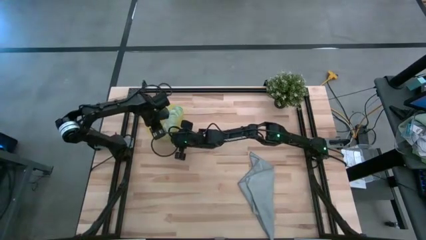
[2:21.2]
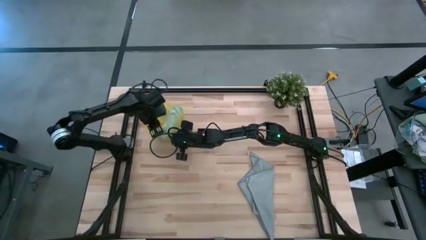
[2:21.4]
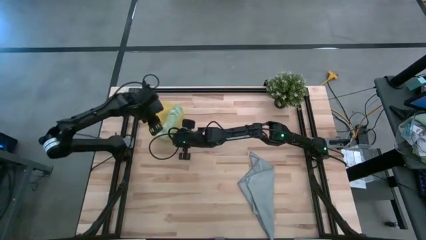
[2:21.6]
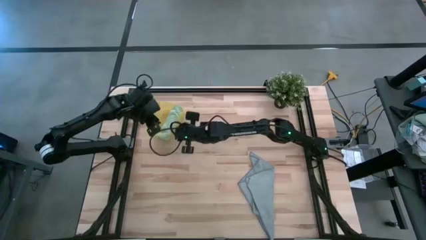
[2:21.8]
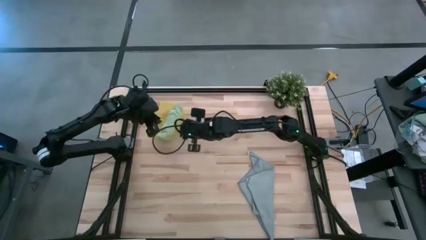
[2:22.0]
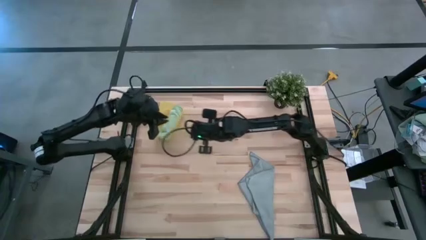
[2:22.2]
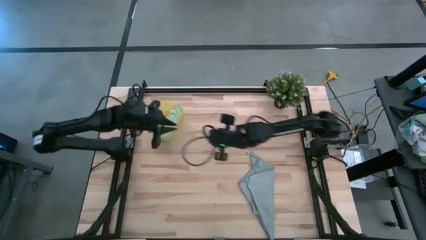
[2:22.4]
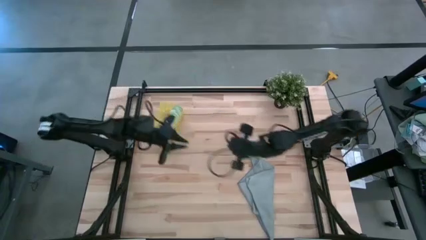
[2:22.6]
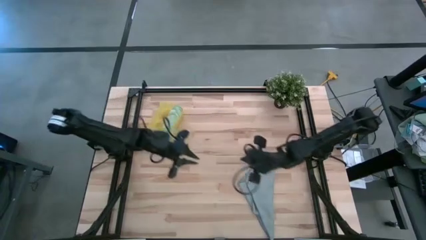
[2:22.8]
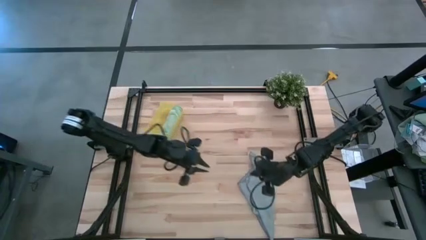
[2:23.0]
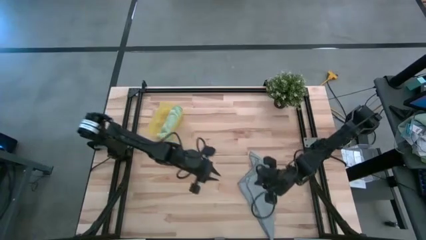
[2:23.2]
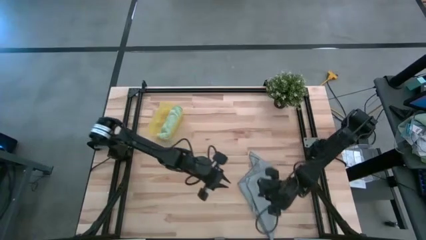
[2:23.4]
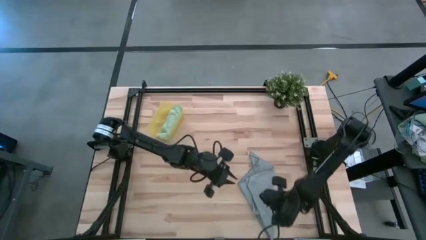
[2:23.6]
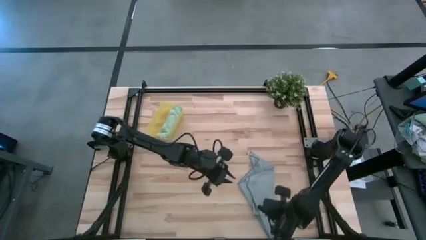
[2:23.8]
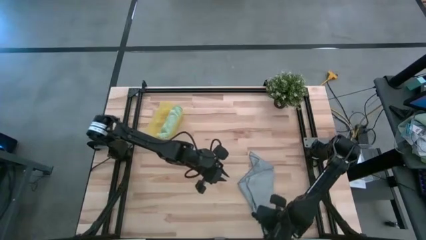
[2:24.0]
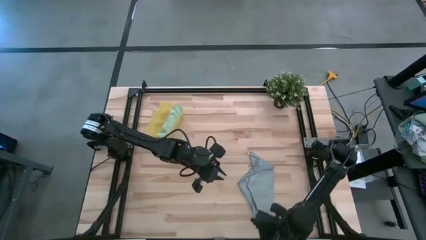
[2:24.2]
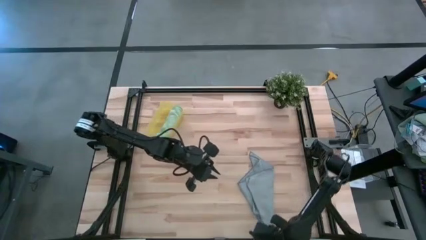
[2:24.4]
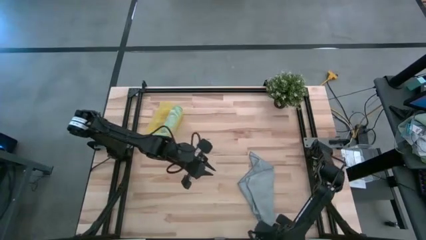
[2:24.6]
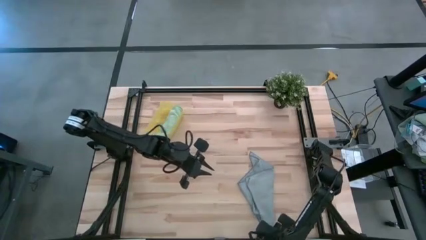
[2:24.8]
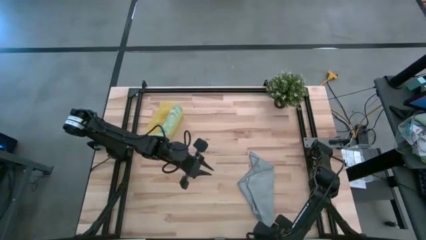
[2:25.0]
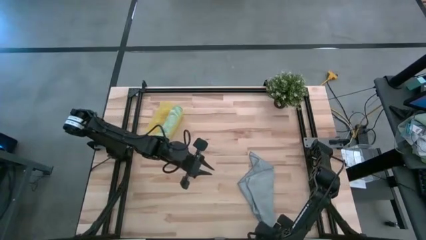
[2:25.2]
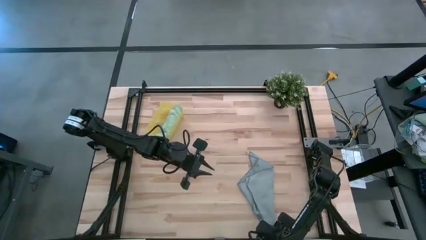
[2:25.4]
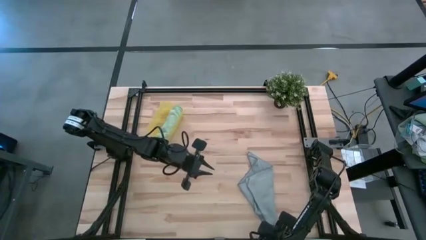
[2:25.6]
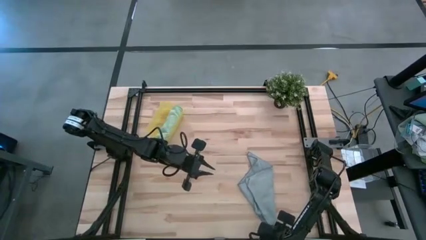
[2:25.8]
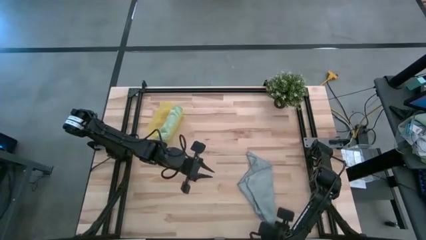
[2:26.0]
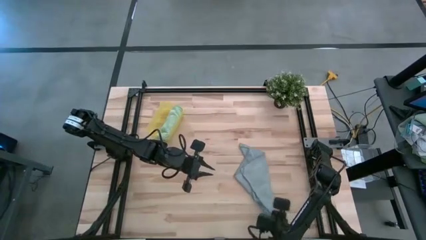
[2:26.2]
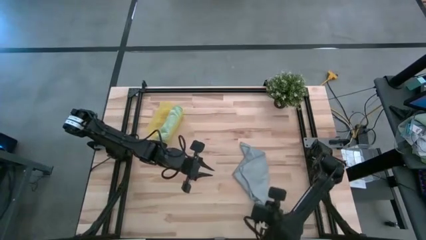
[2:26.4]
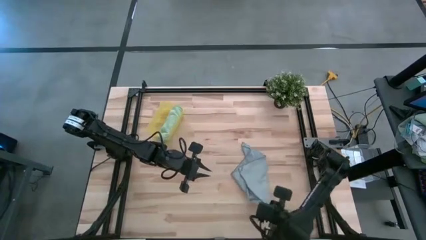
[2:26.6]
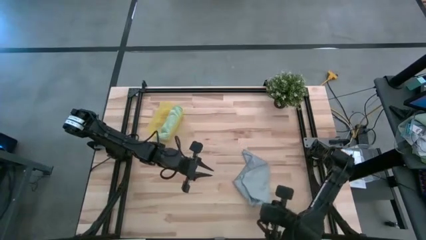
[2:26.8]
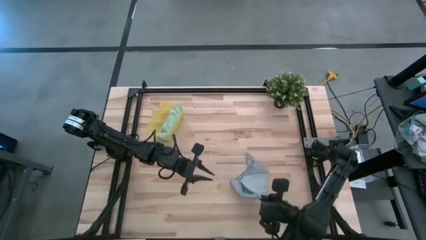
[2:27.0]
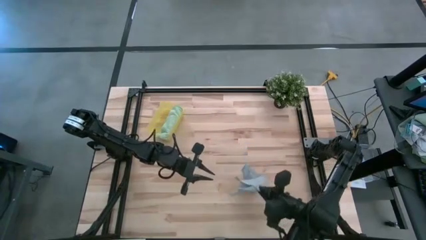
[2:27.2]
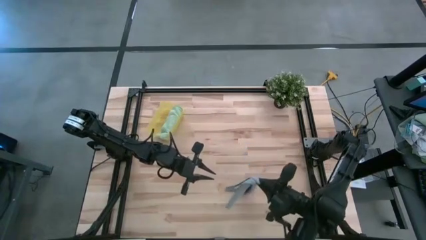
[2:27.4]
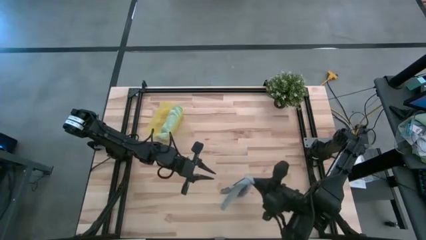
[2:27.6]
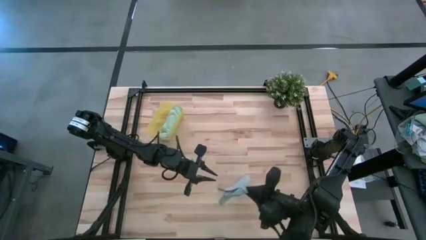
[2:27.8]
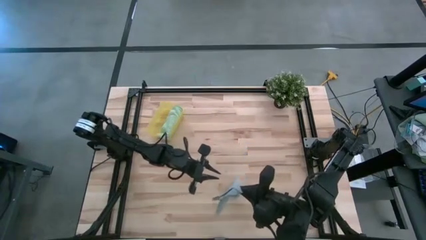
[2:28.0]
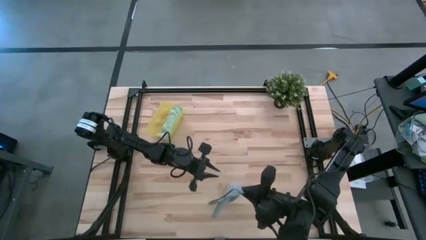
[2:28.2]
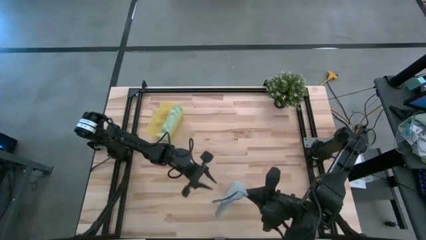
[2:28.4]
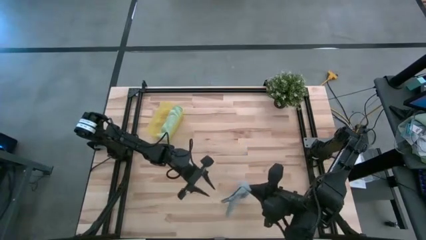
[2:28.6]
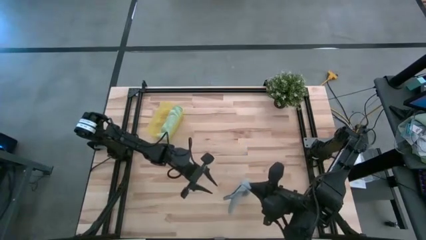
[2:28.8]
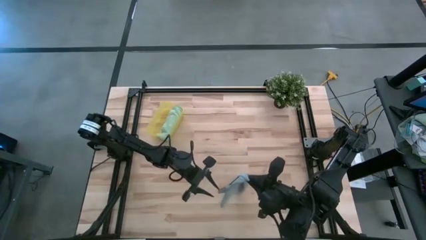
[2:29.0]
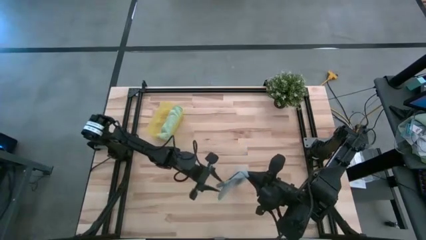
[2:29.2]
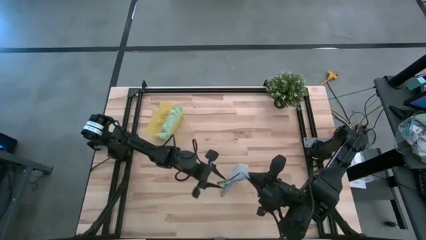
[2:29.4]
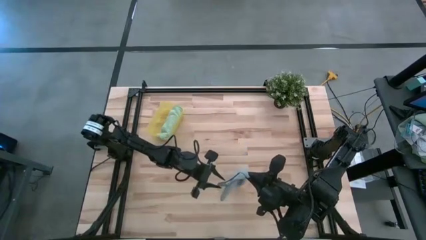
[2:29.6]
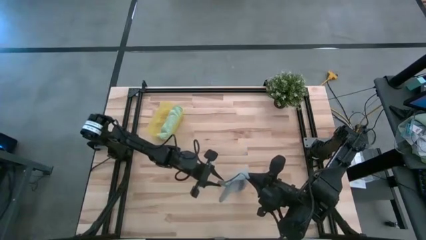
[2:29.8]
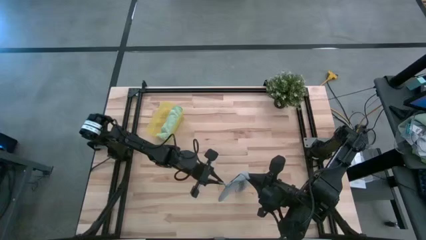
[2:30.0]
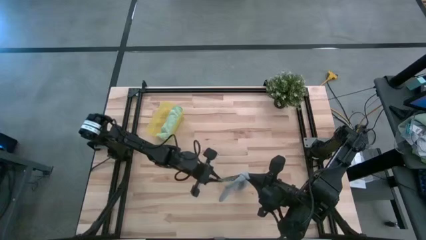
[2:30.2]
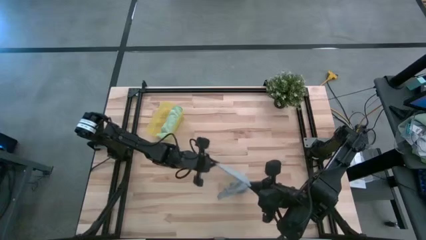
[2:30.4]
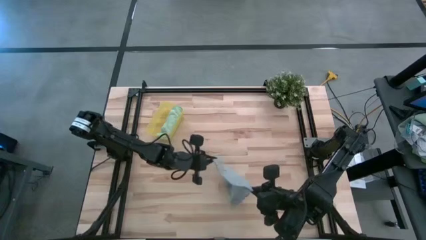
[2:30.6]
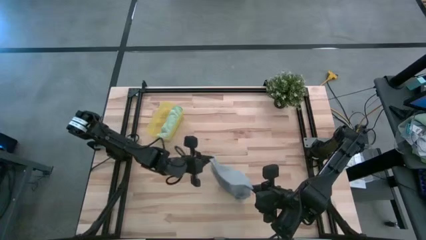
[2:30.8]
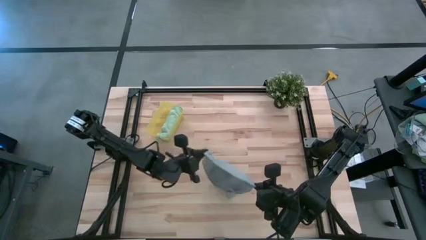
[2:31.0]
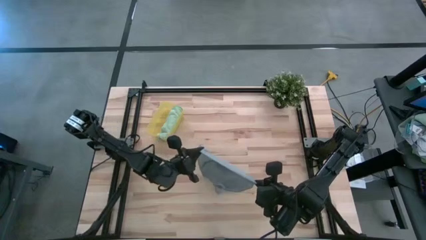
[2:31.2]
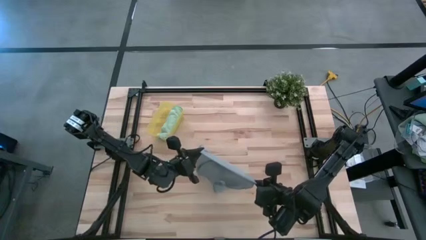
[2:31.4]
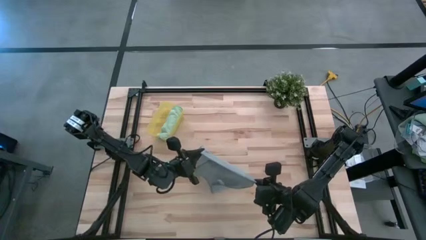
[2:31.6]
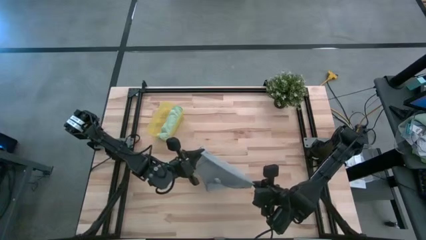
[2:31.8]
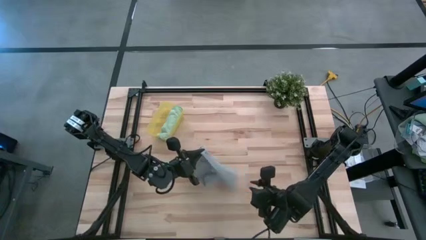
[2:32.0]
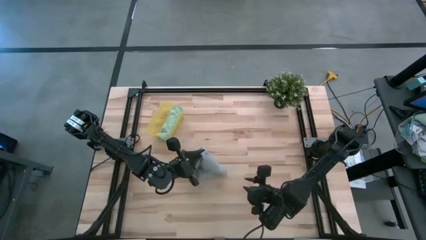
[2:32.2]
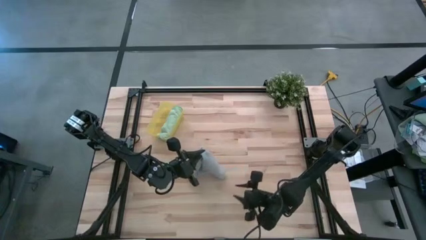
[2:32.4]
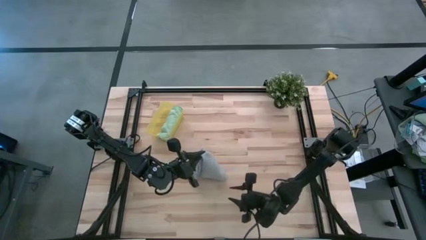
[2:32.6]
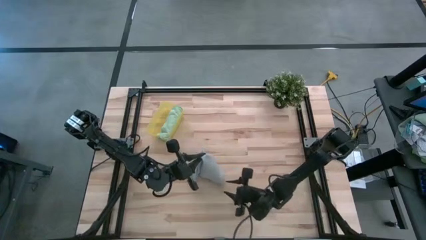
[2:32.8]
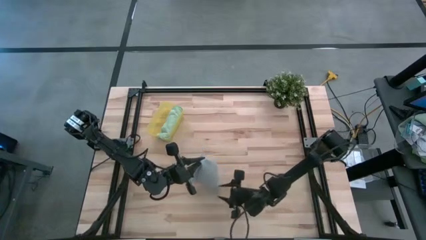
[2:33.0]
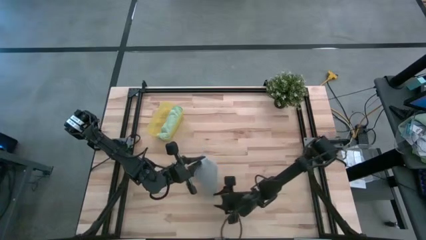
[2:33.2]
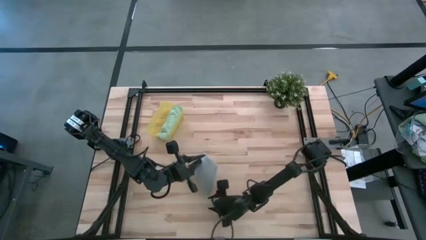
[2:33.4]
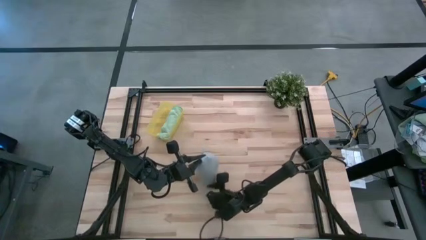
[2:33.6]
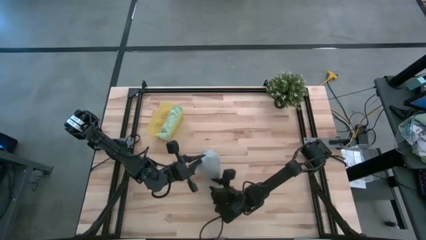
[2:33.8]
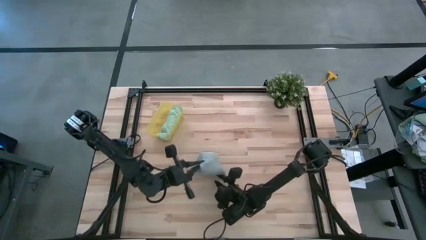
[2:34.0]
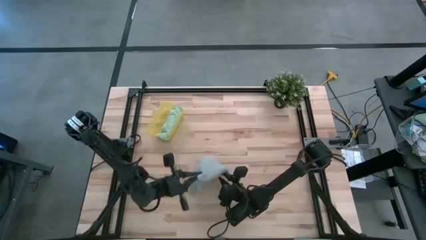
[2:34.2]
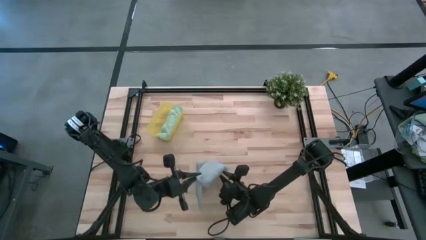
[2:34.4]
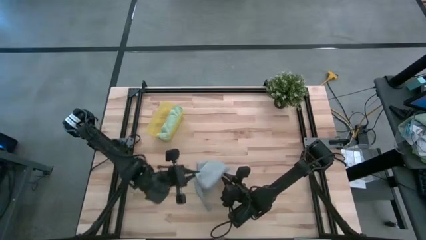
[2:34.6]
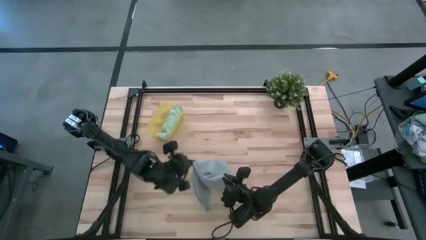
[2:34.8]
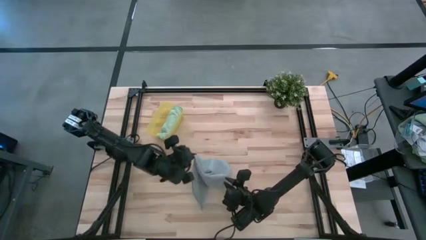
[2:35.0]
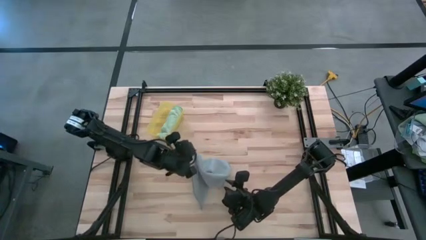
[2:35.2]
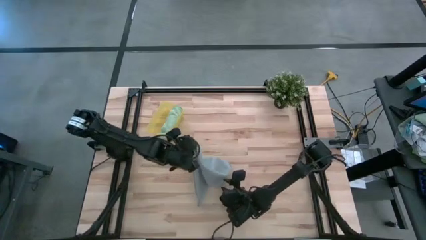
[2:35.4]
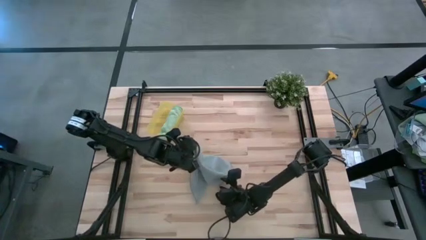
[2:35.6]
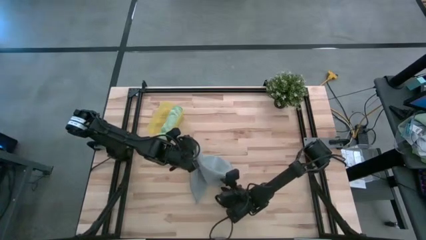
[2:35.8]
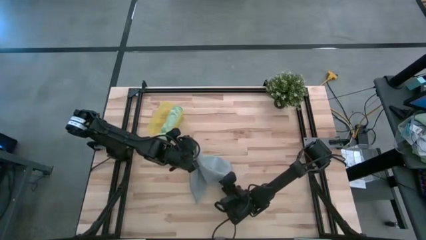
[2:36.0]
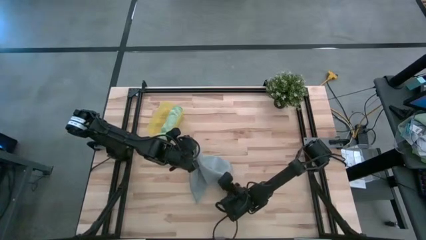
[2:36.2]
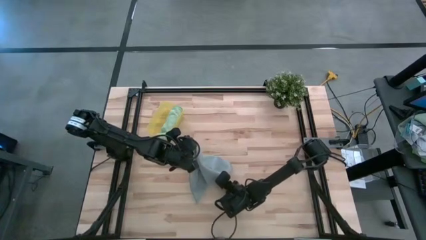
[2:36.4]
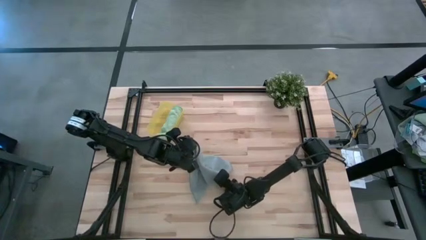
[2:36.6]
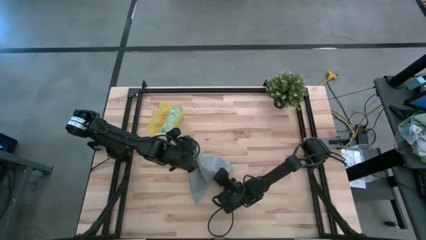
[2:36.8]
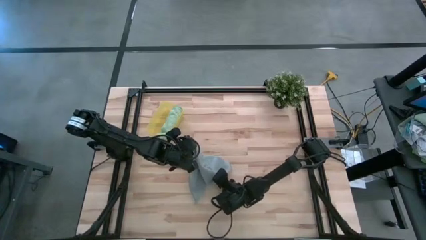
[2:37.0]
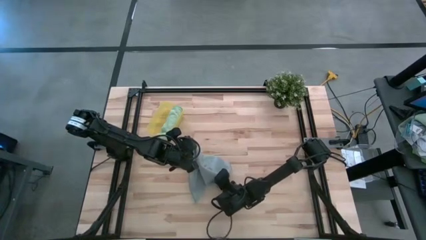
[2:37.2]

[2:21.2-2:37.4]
Task: Roll microfiber towels into tight, uniform cylinder then place into a basket
Fold the gray towel
